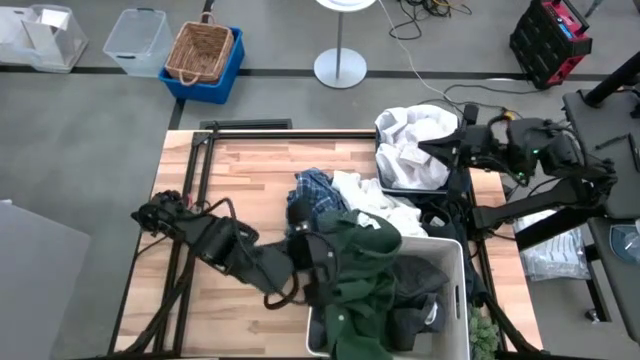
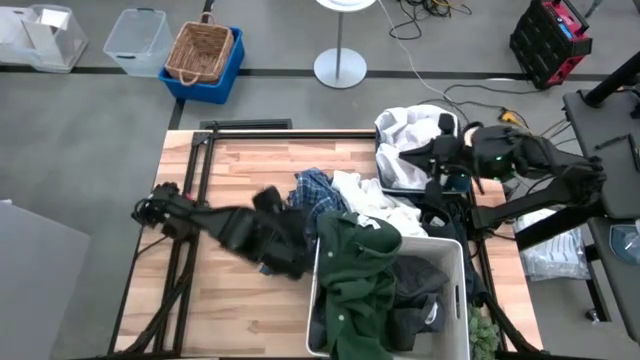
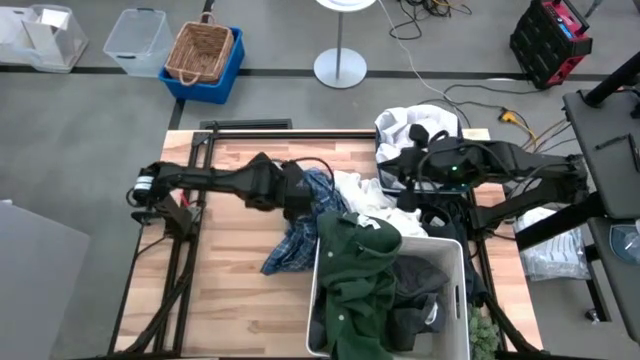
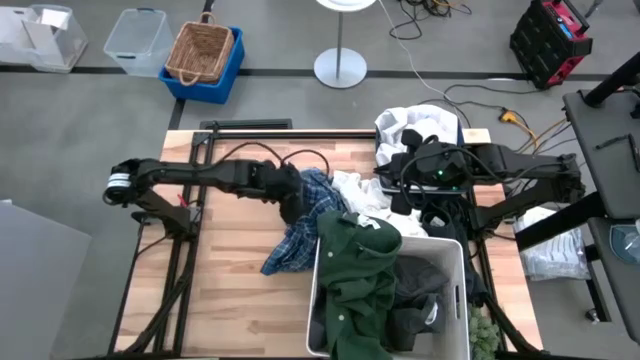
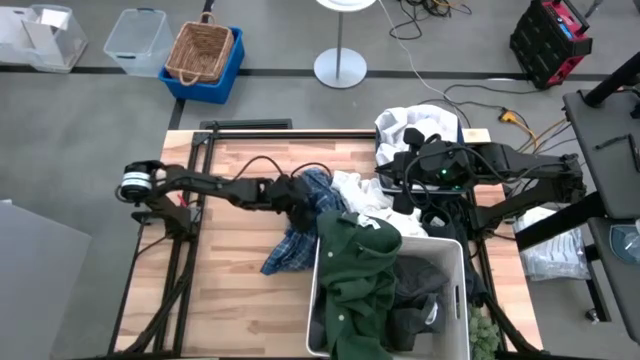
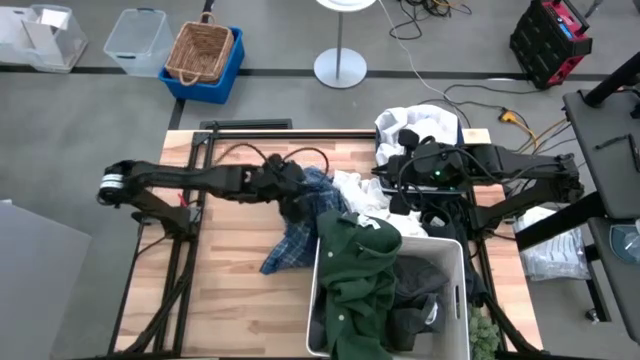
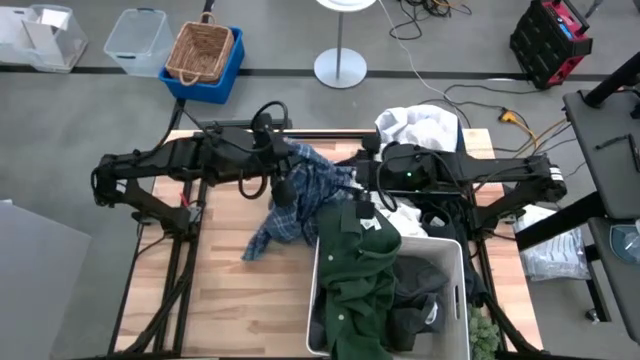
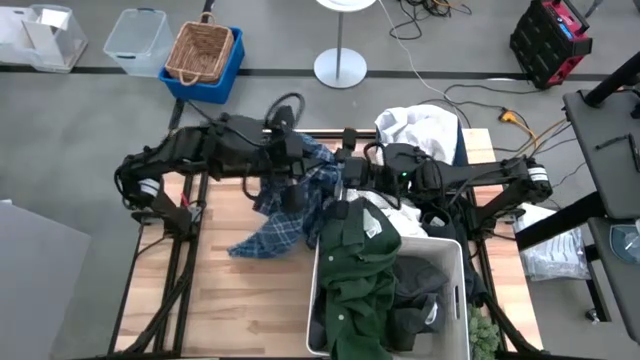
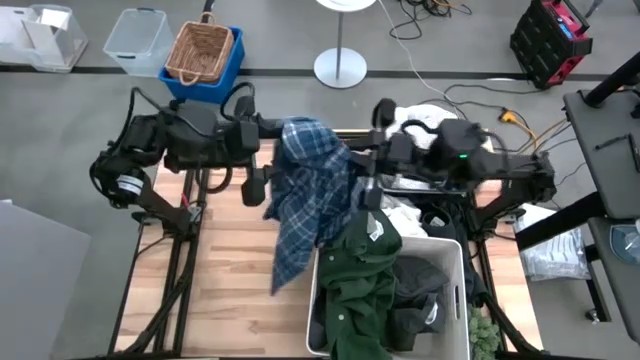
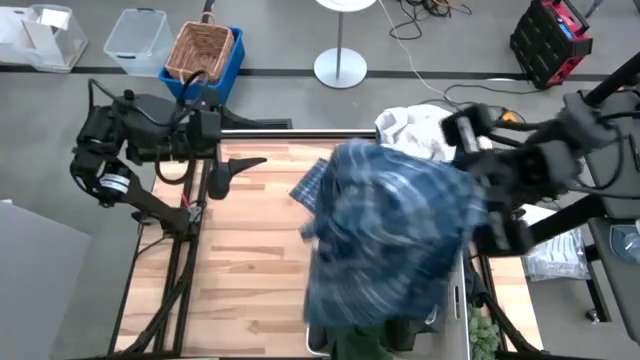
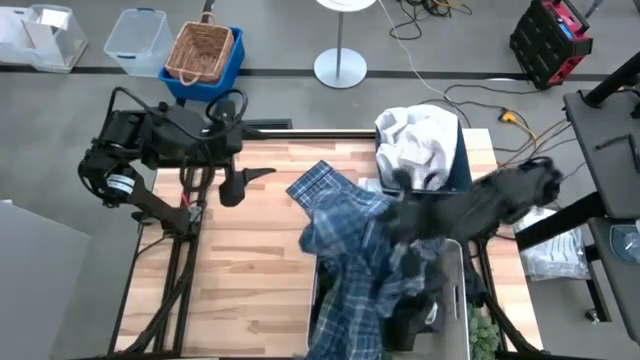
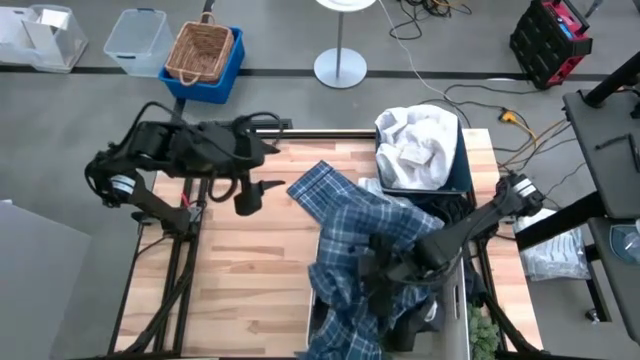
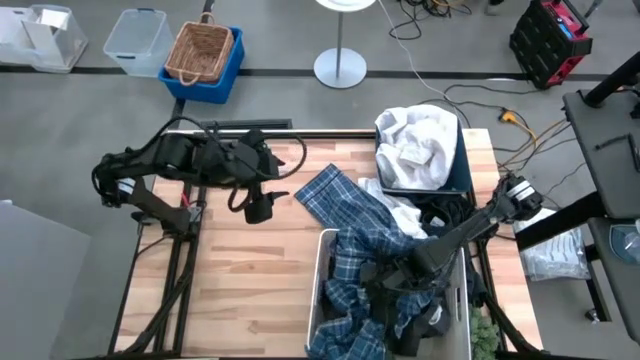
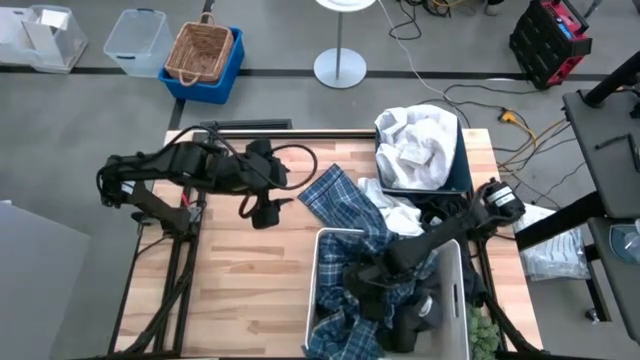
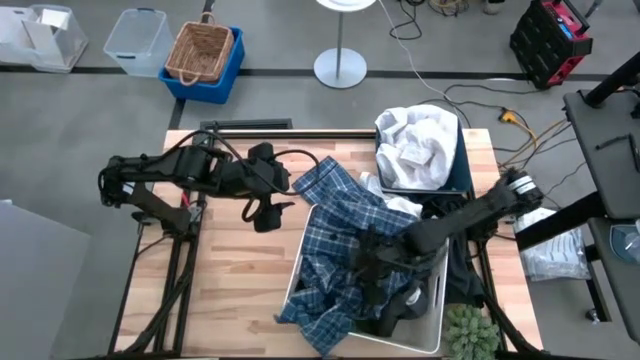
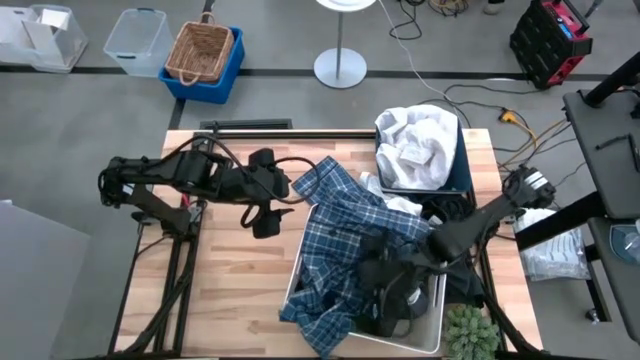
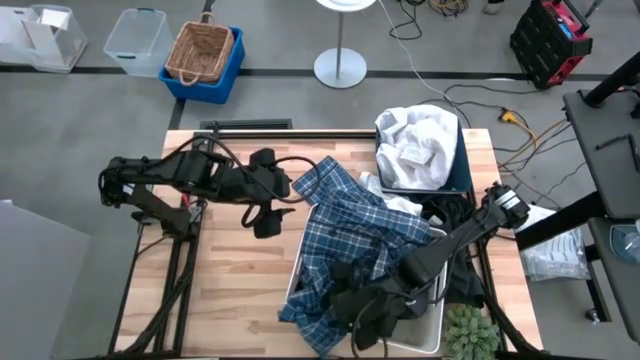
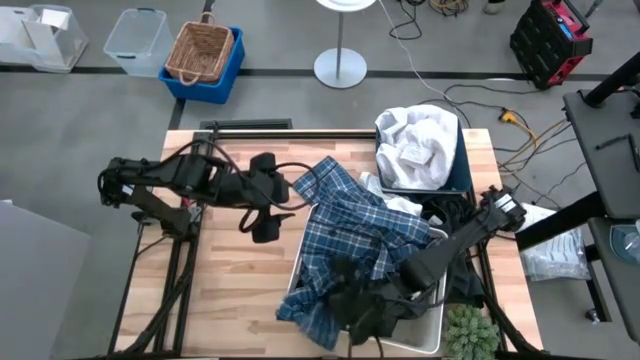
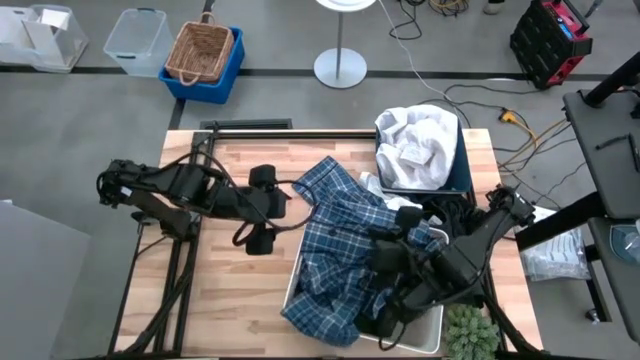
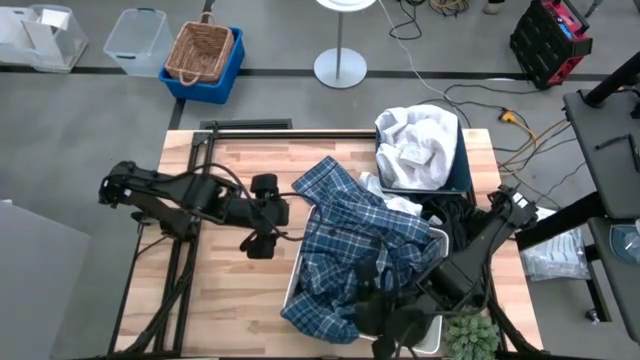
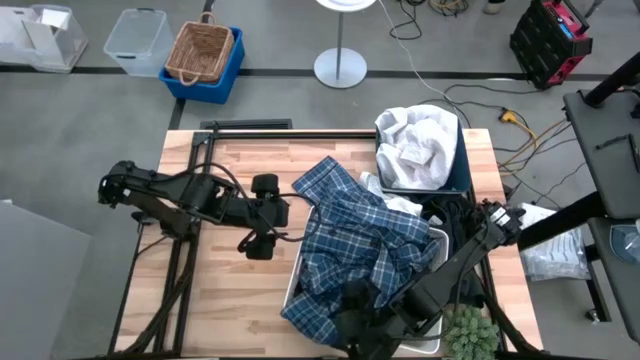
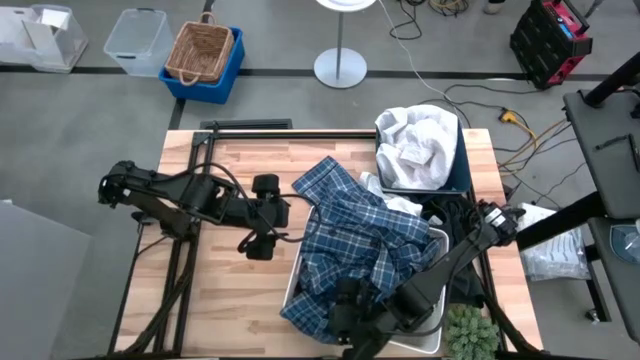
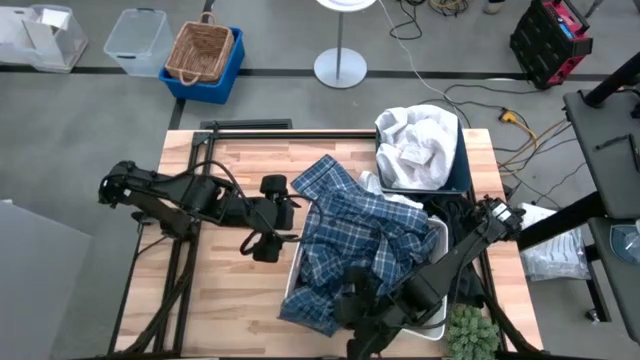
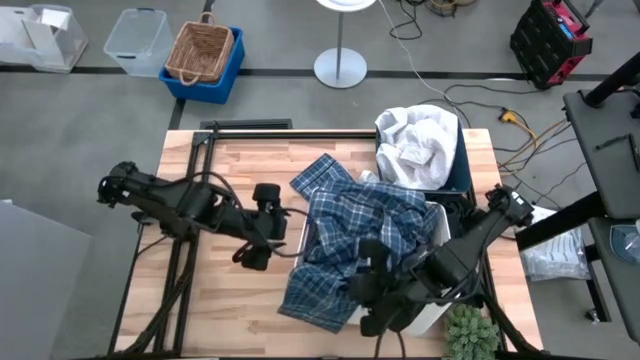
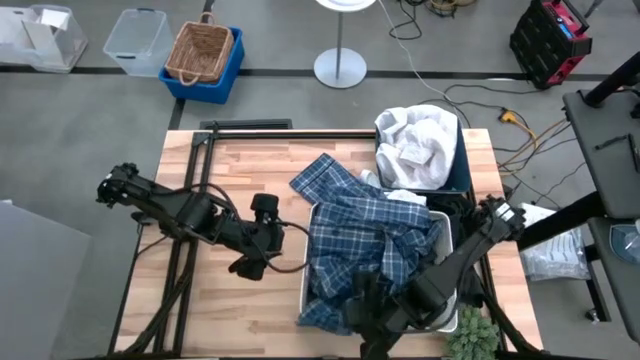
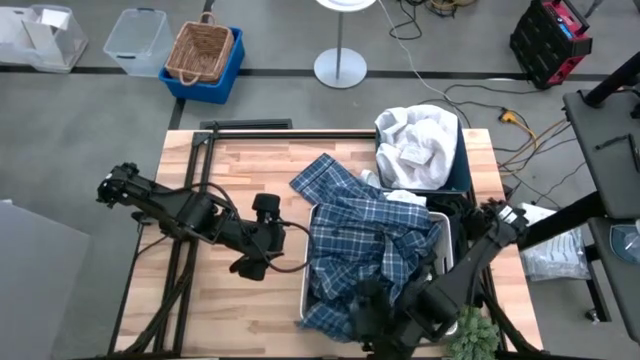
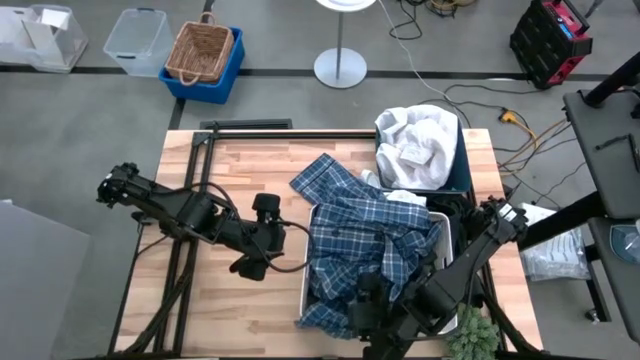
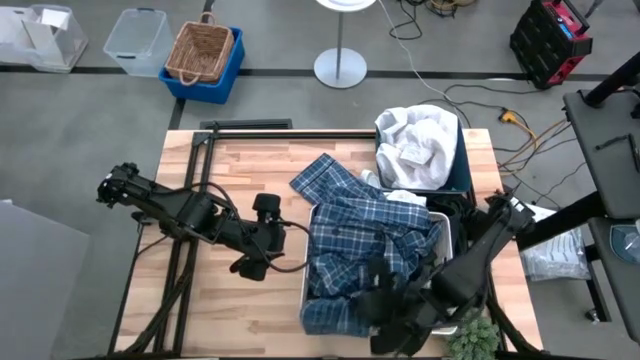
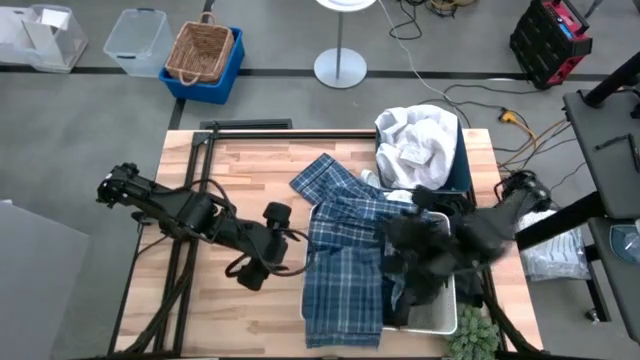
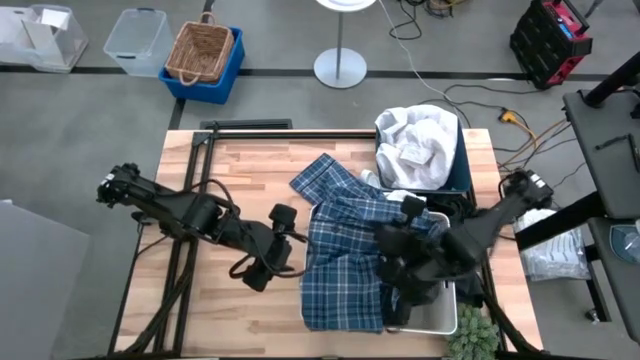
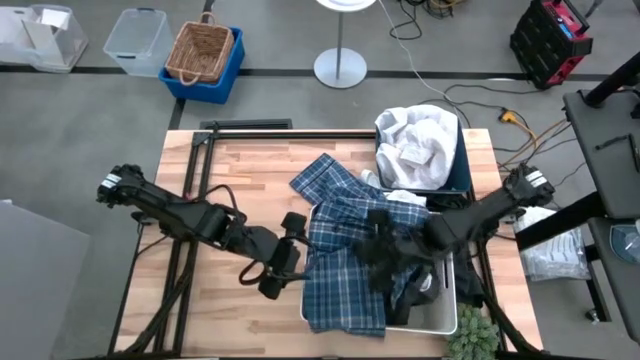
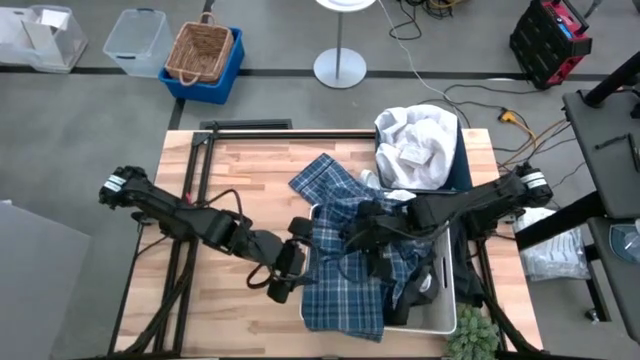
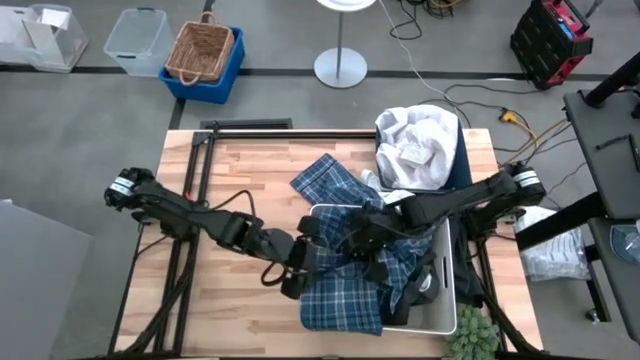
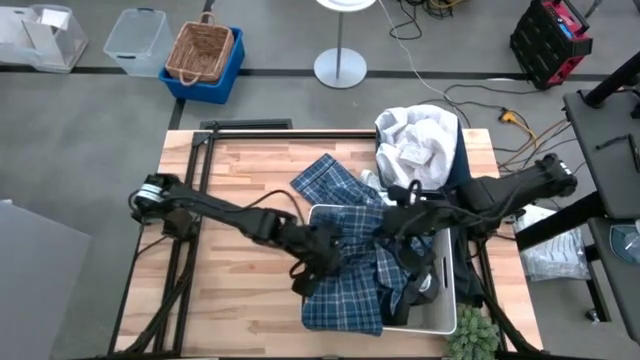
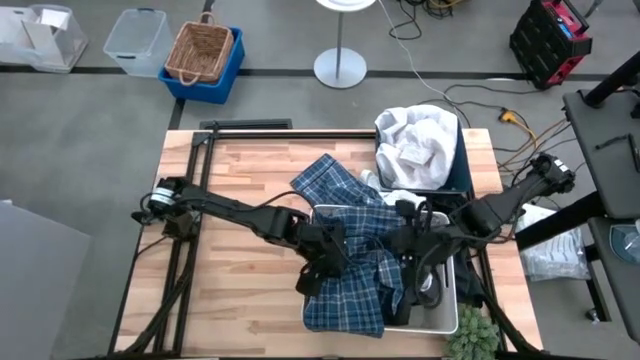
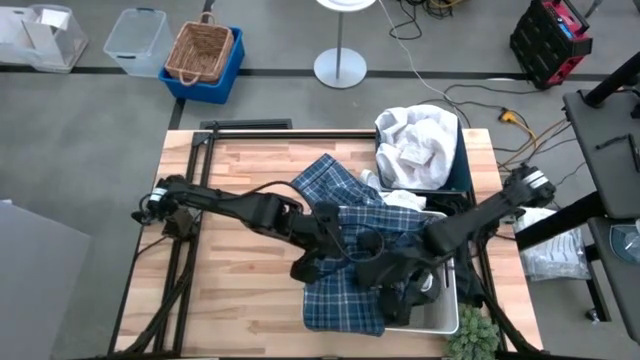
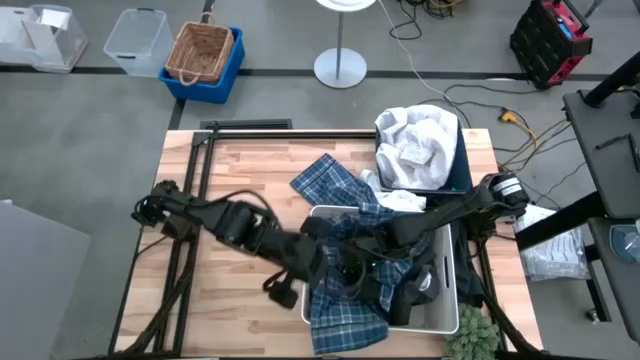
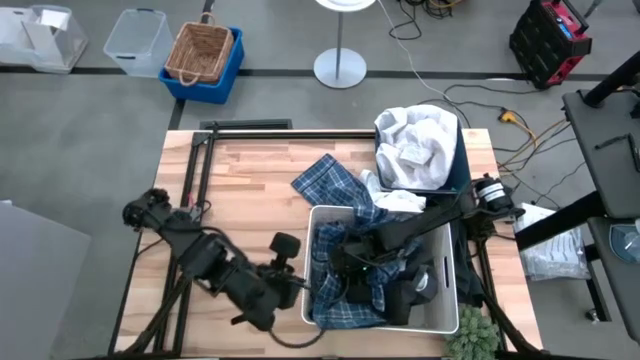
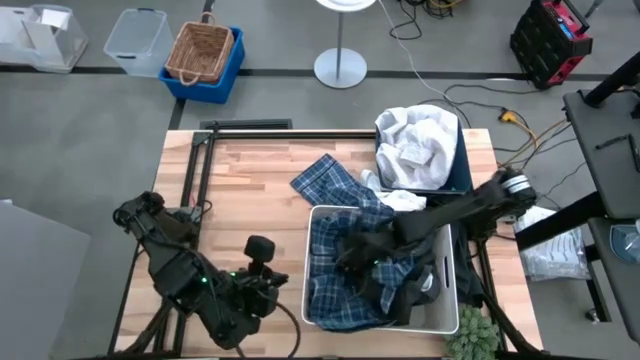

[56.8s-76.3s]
Task: Sort clothes
Put the blue sleeve shirt into the white bin

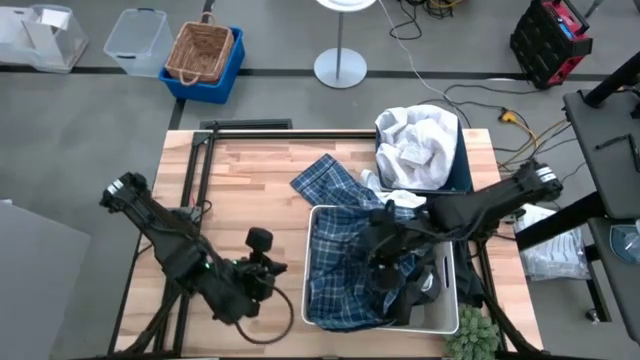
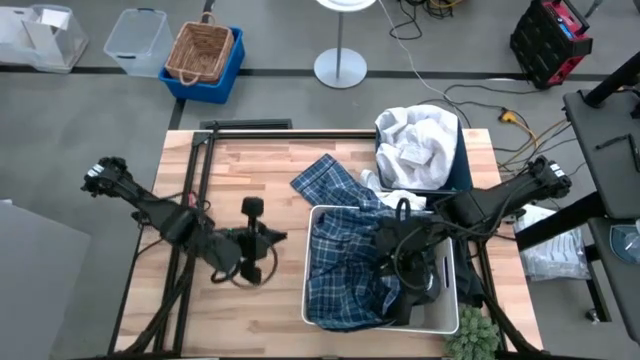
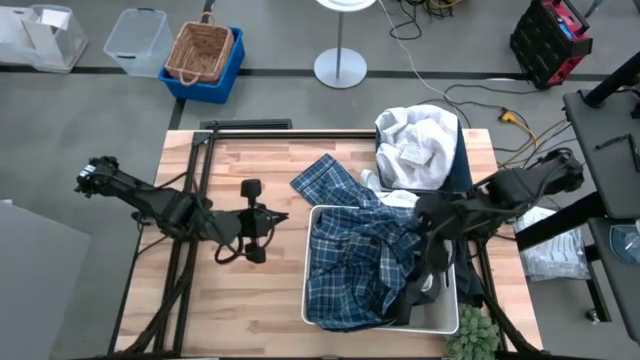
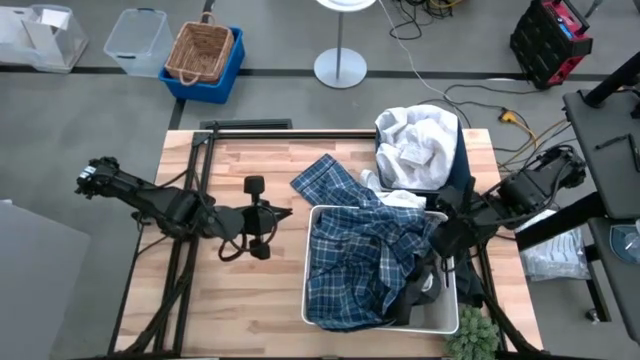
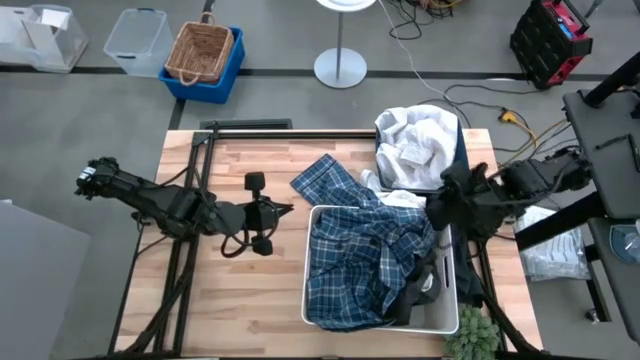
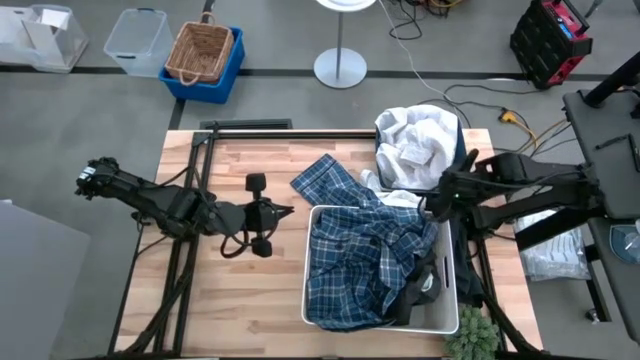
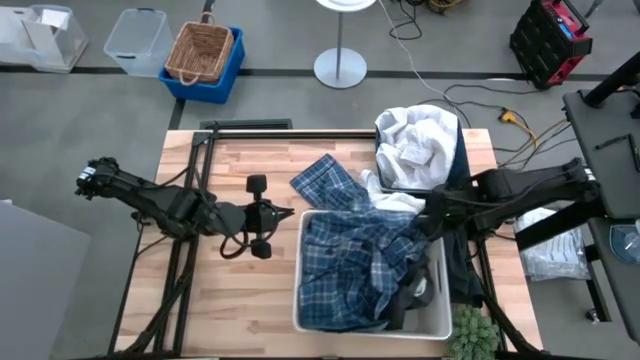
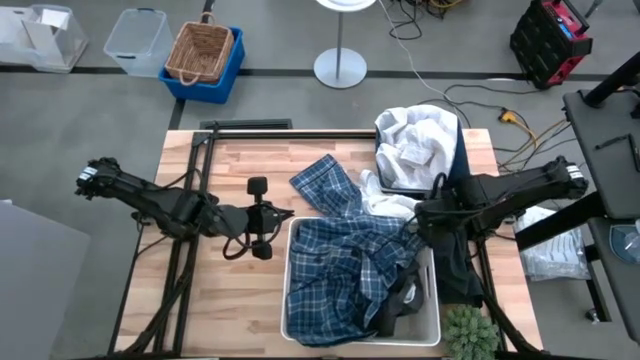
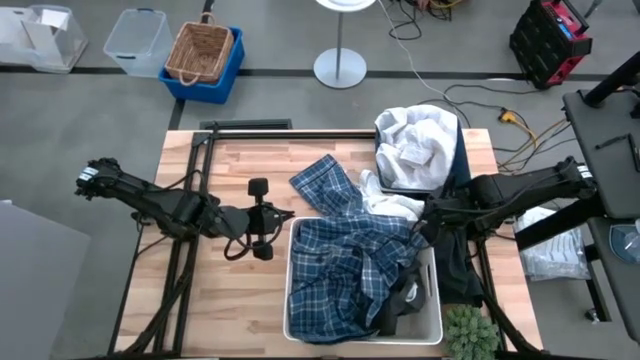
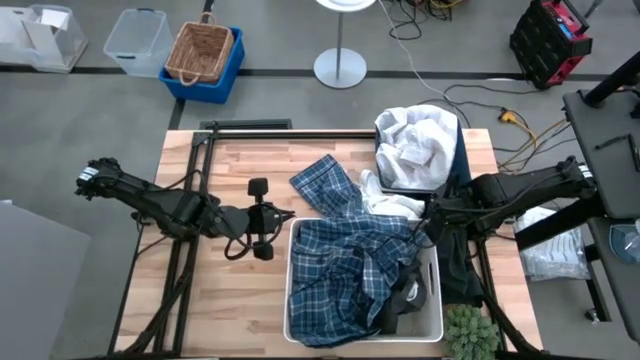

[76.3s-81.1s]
Put the black shorts into the white bin
